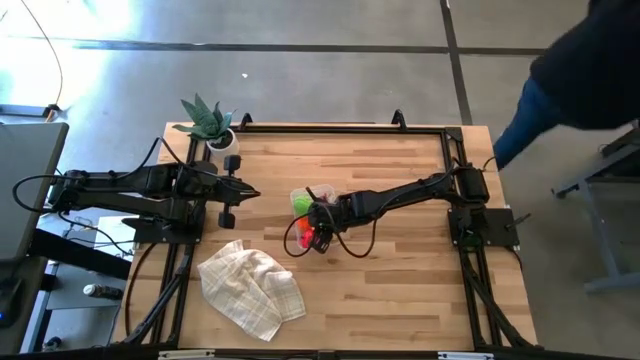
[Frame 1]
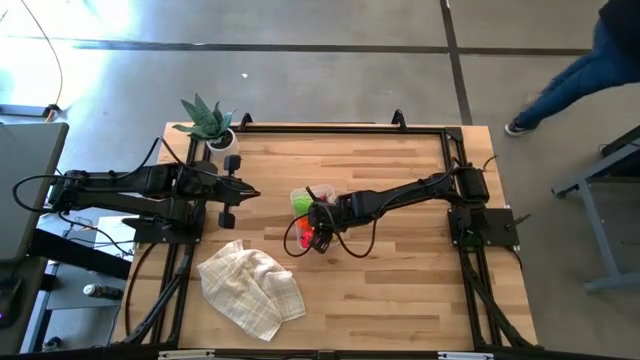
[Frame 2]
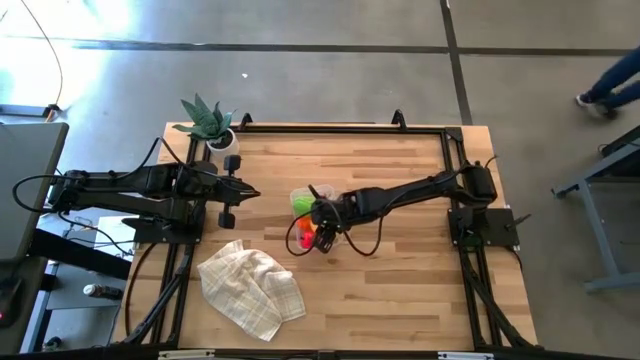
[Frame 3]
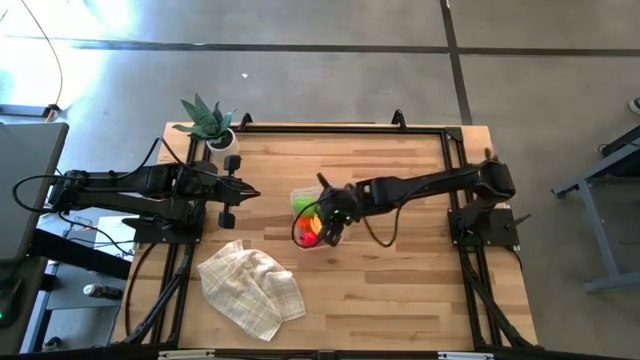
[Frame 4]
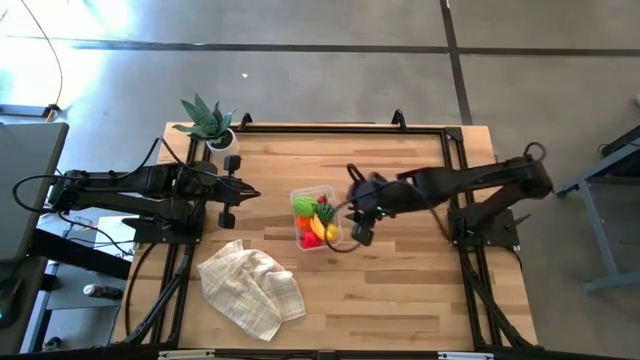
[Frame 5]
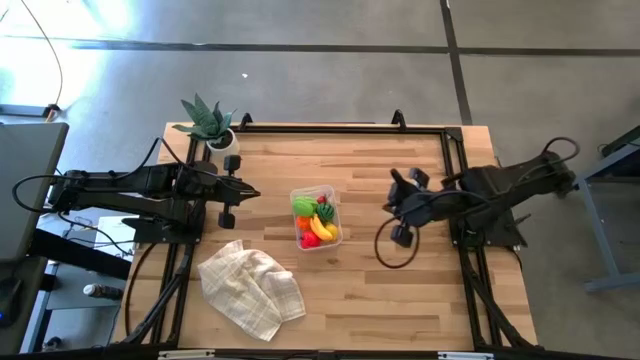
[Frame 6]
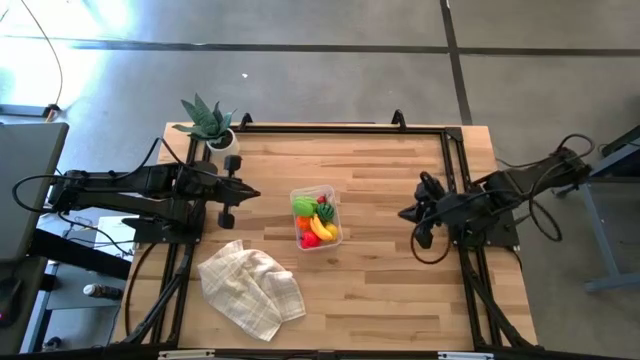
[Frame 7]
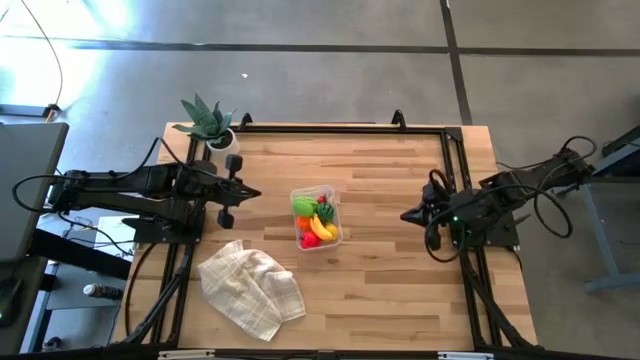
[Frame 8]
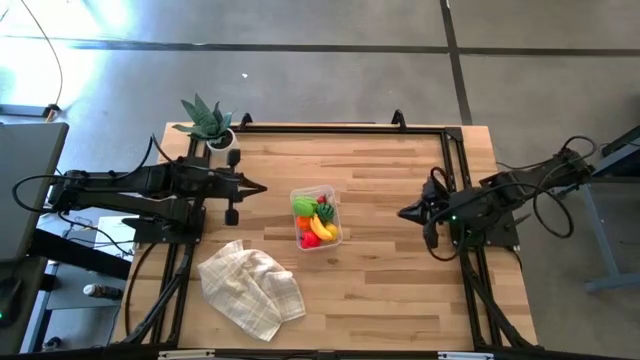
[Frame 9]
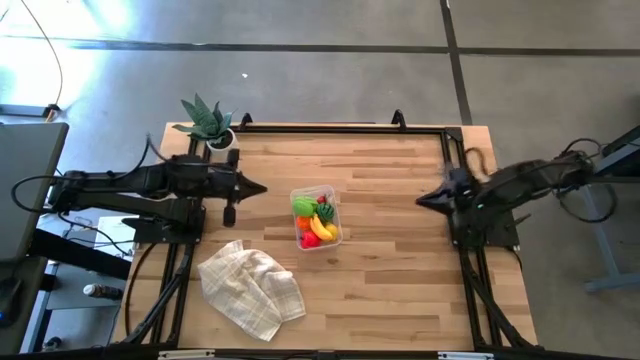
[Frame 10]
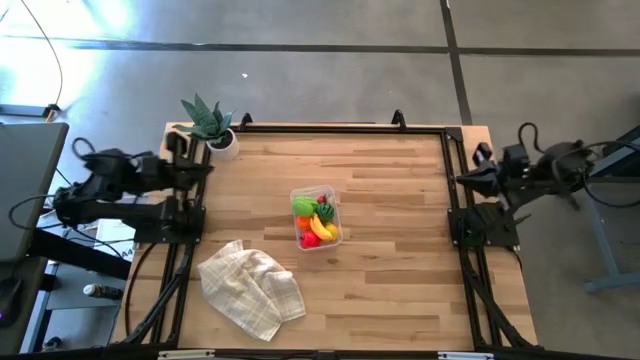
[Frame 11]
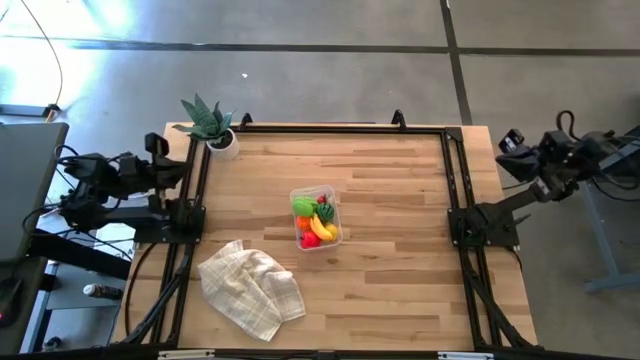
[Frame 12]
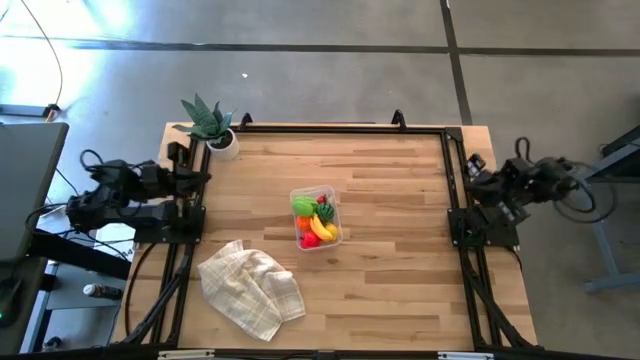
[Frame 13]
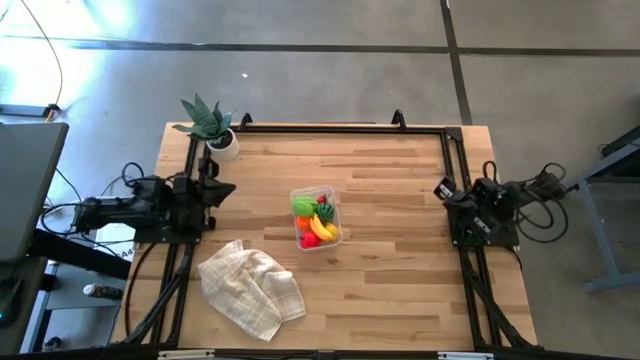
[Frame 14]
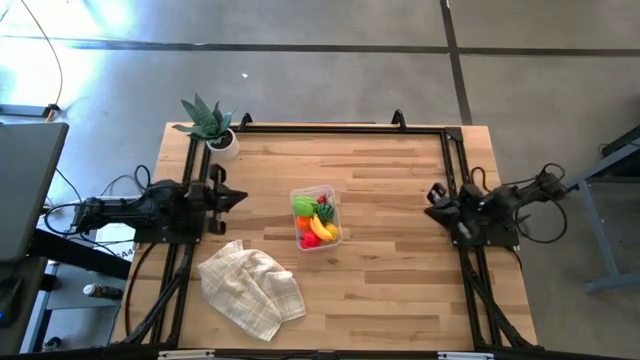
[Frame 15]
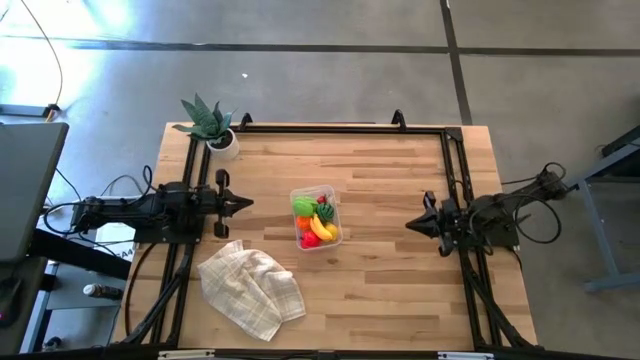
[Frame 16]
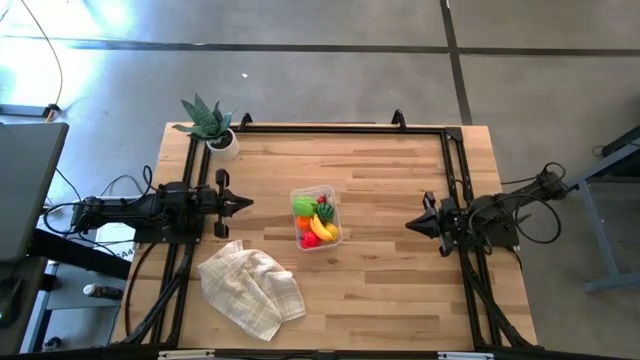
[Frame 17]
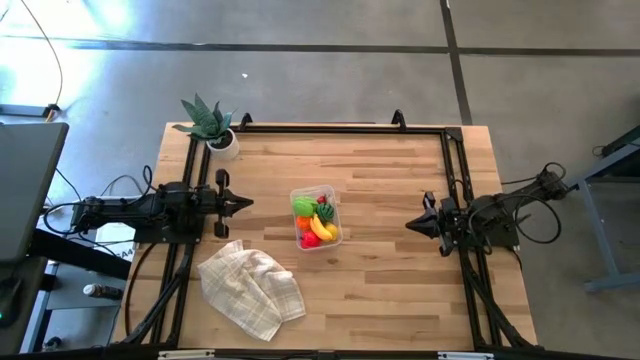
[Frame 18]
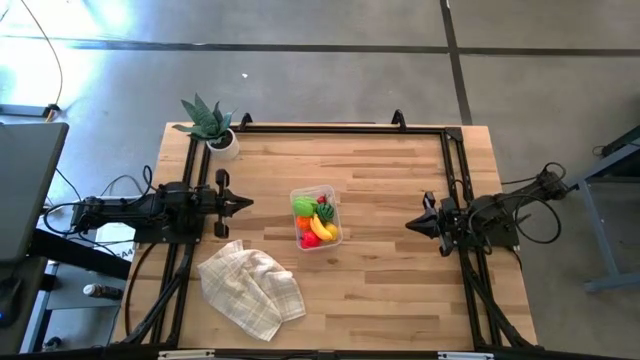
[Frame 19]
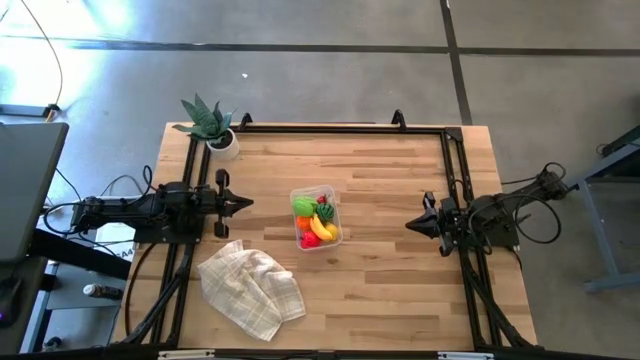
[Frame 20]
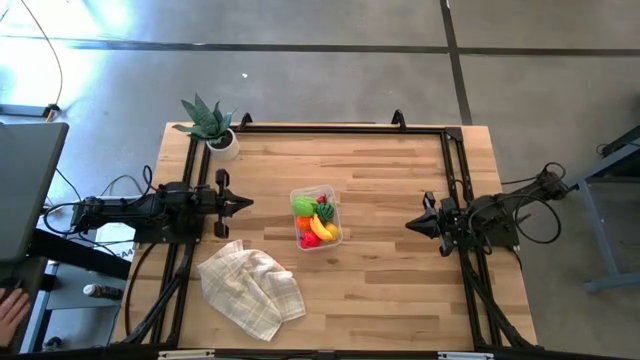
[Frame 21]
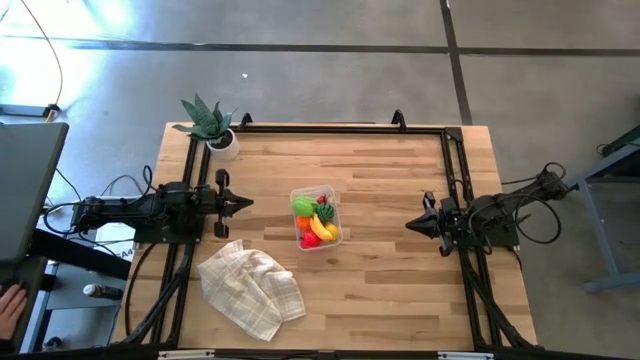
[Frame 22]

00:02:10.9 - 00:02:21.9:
Task: Pick and placing Produce into tupperware
Return to Home Position

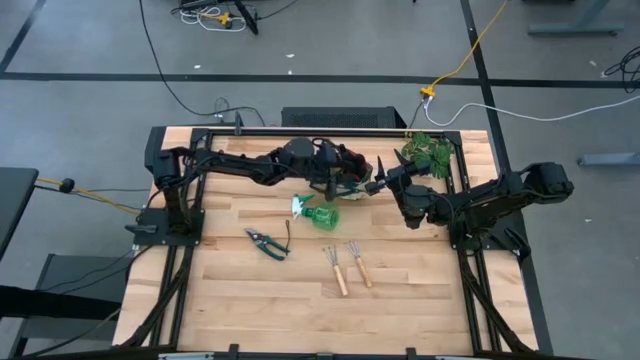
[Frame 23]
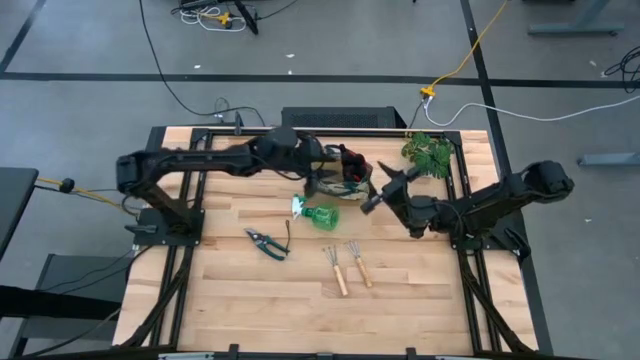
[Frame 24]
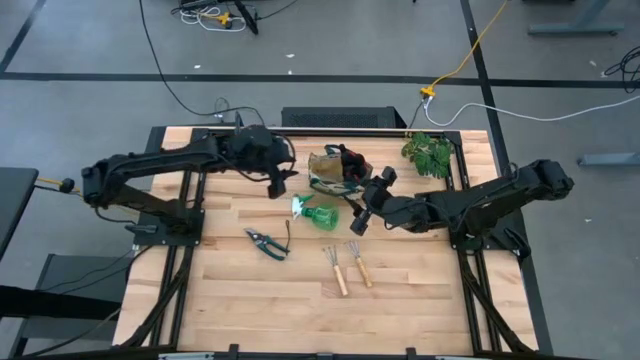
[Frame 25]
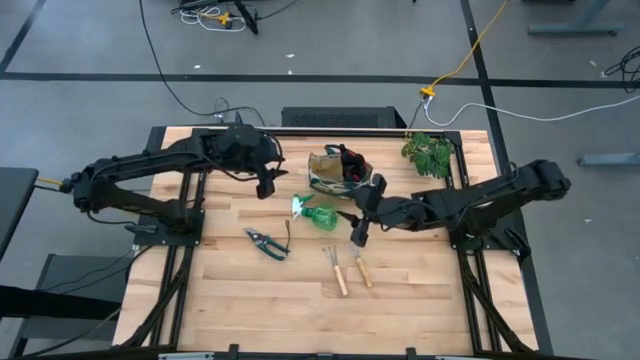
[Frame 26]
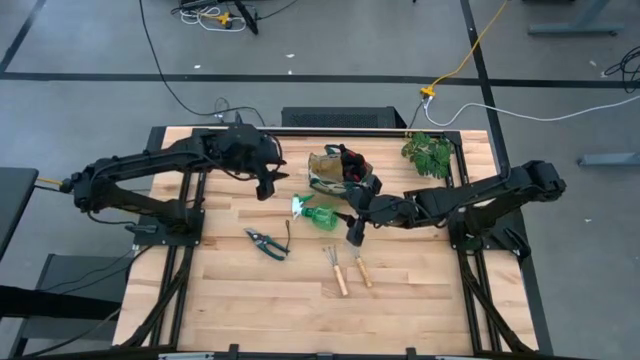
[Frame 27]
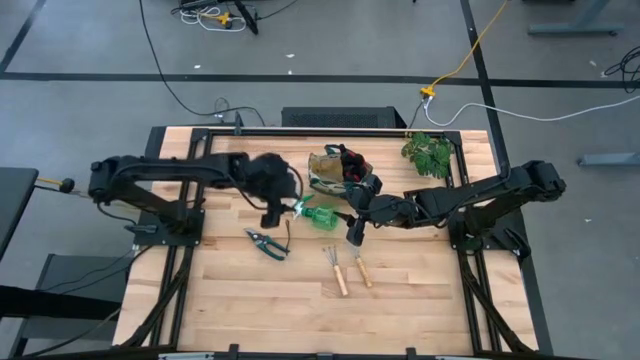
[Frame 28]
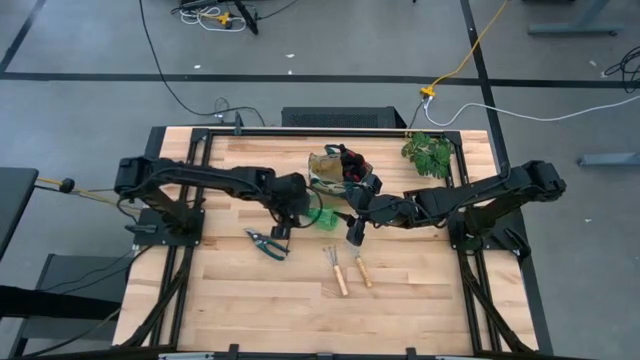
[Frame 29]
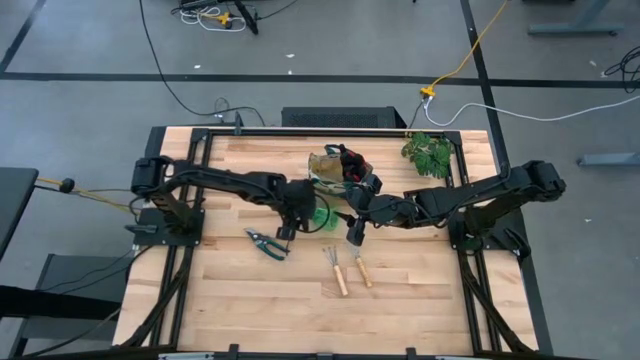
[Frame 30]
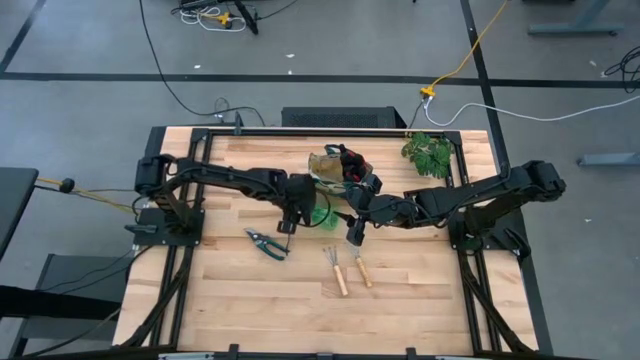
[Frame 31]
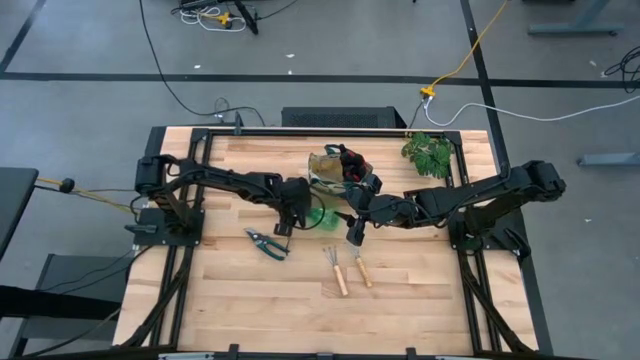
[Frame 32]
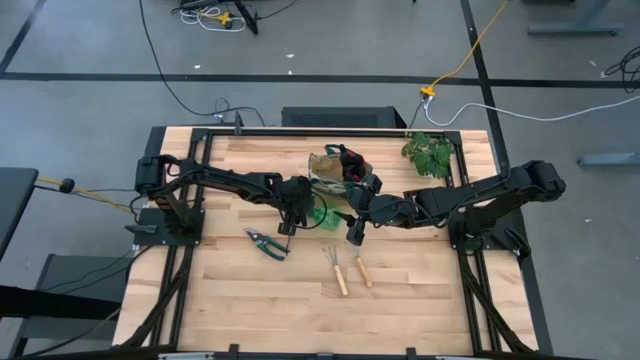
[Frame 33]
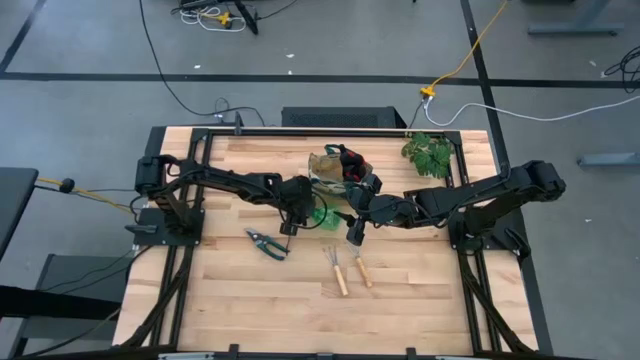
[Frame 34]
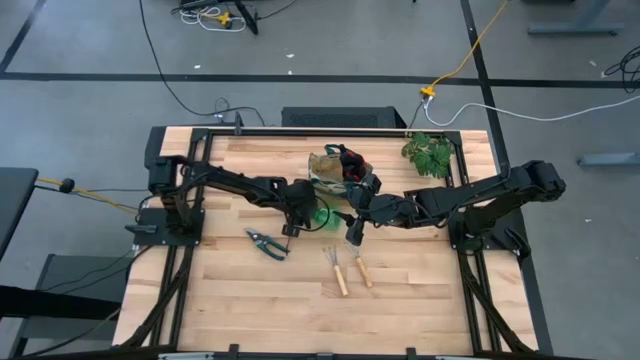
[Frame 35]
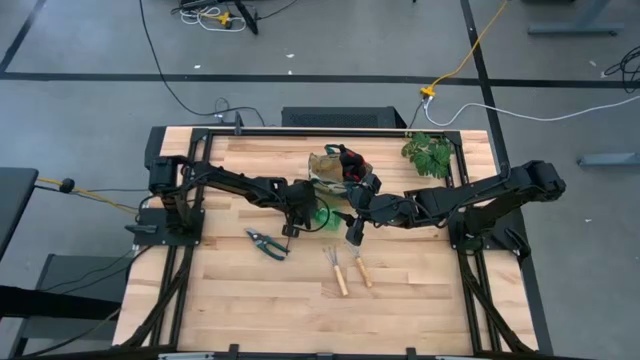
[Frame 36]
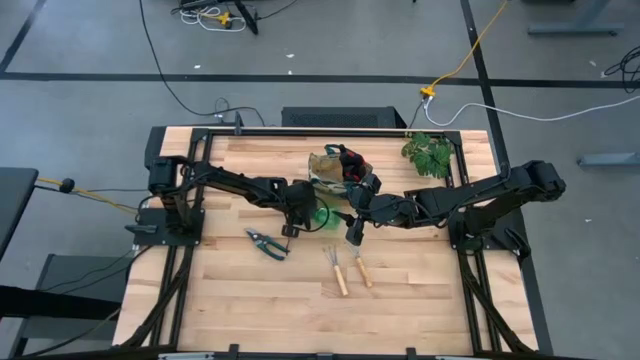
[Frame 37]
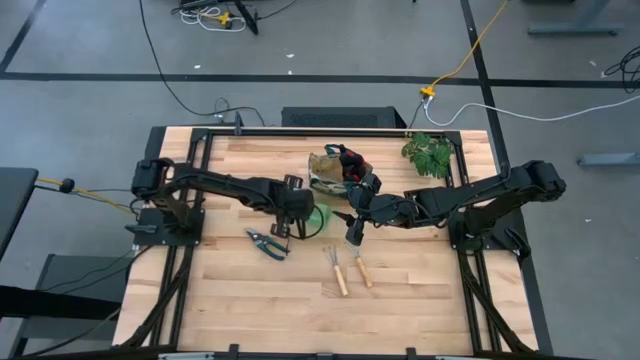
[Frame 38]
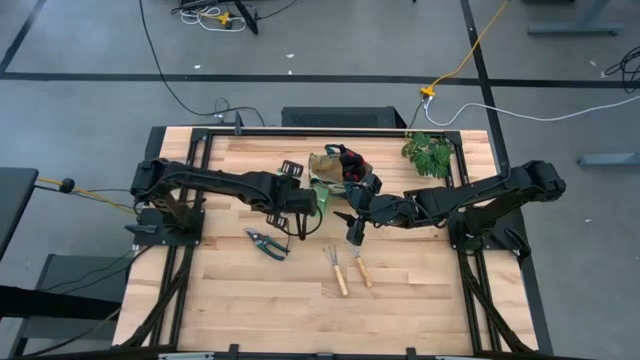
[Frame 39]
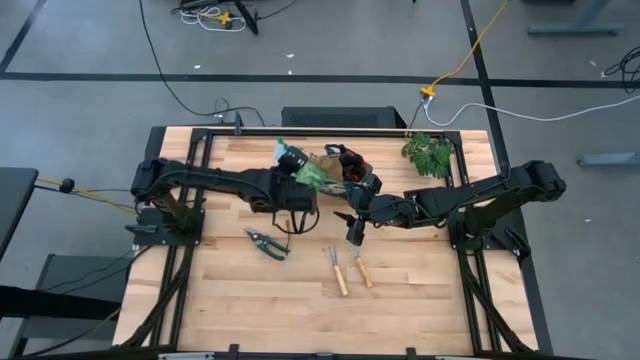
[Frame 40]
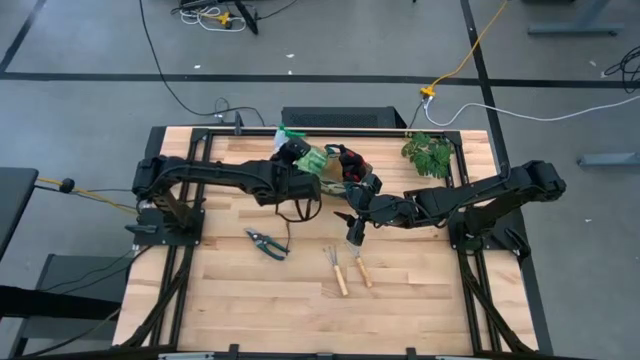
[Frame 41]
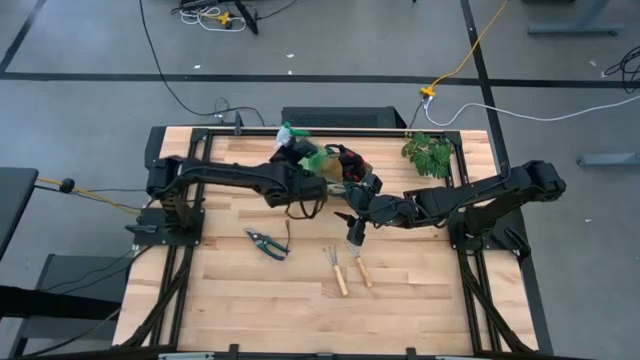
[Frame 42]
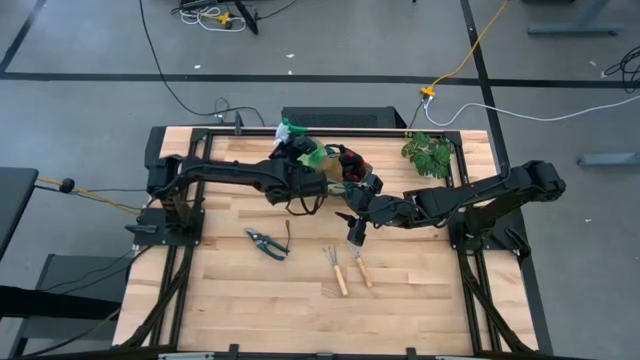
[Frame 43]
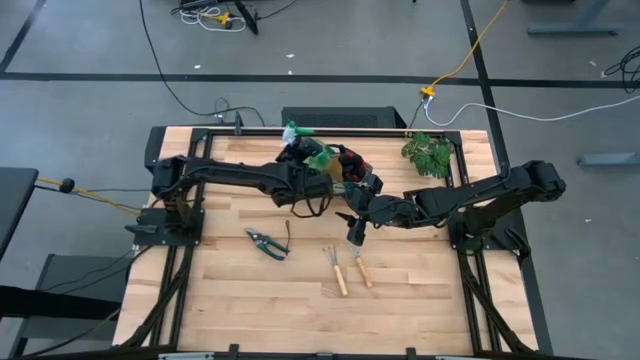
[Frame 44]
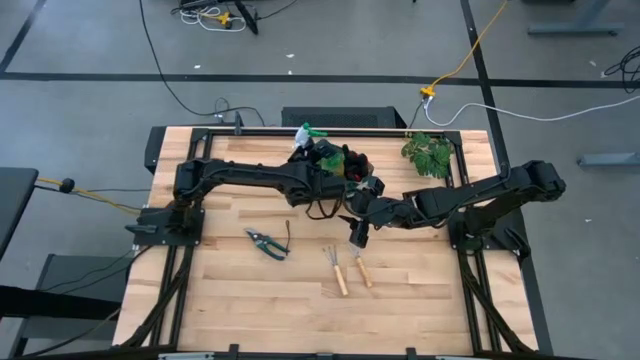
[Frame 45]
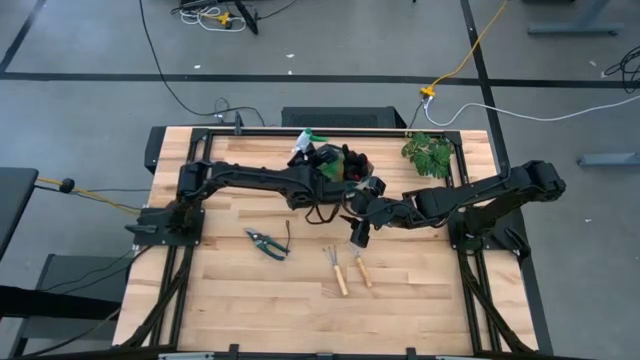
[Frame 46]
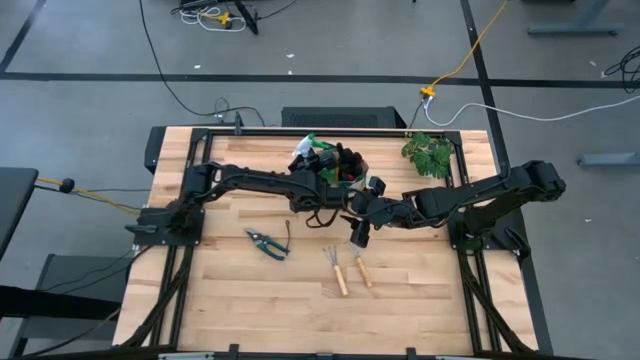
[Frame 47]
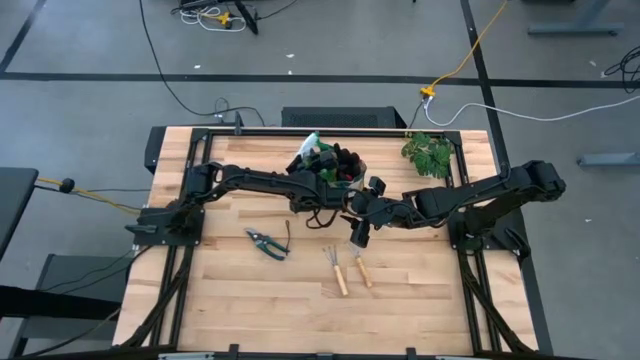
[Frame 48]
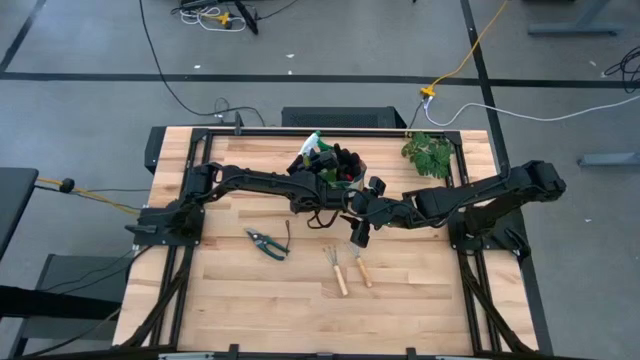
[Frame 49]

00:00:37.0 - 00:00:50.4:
Task: Pick & Place Garden tools in Gardening bag
Put the green spray into the tool bag
